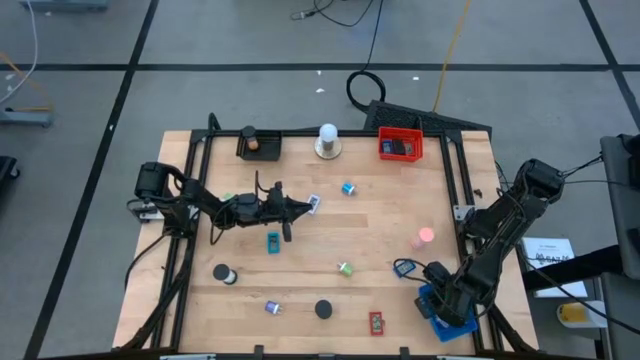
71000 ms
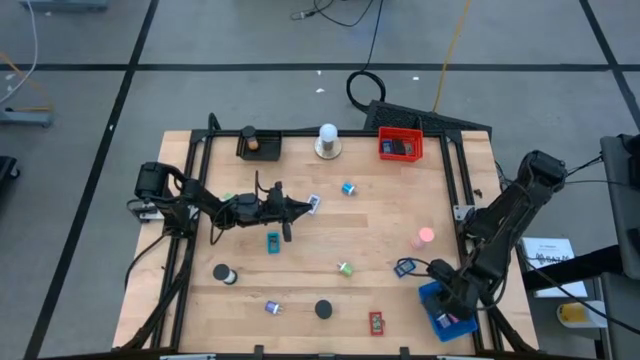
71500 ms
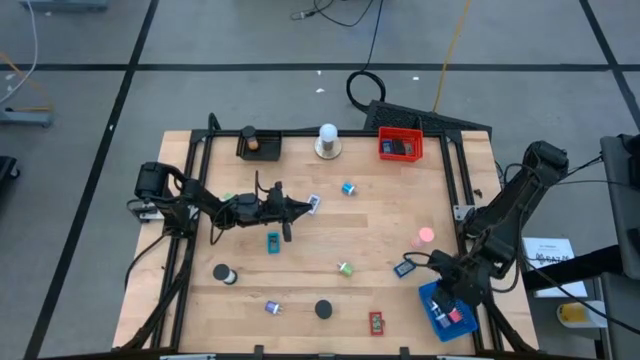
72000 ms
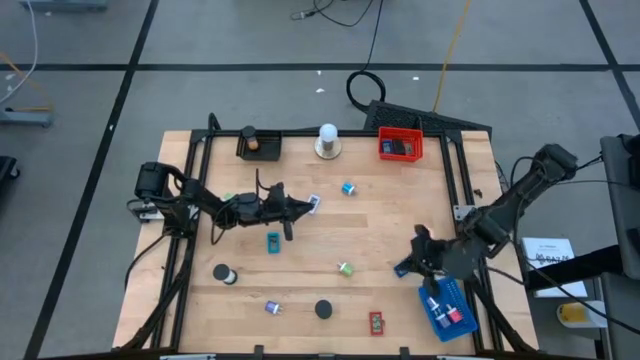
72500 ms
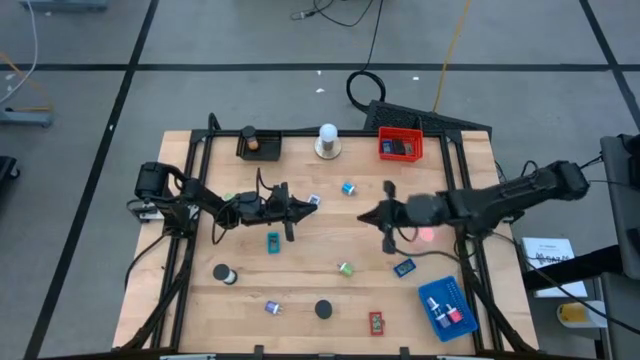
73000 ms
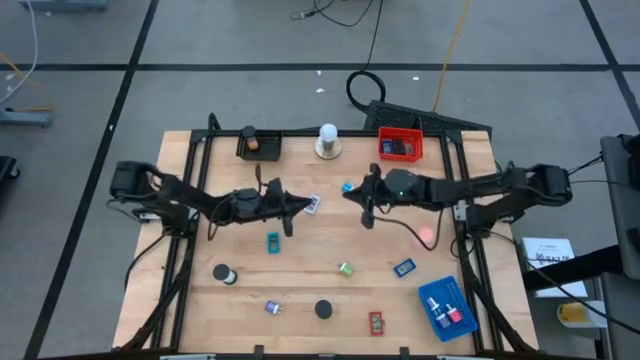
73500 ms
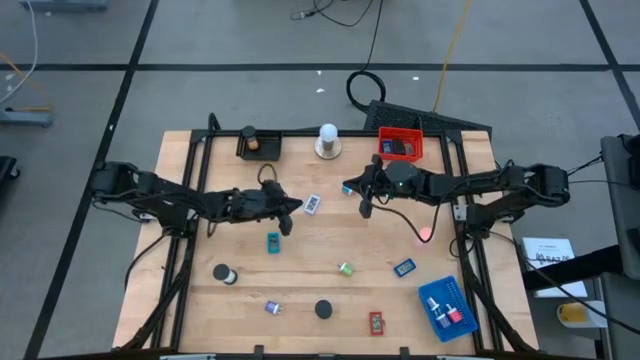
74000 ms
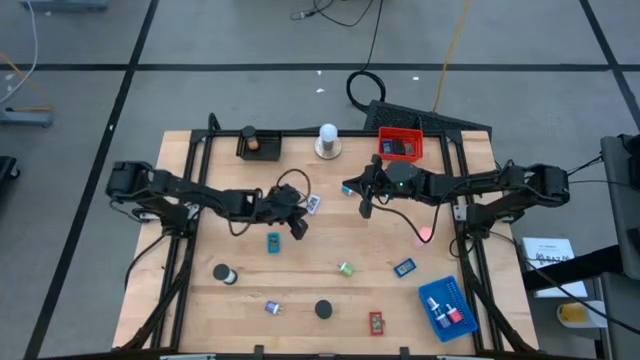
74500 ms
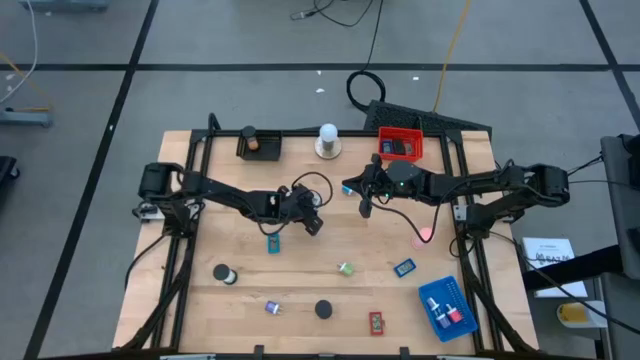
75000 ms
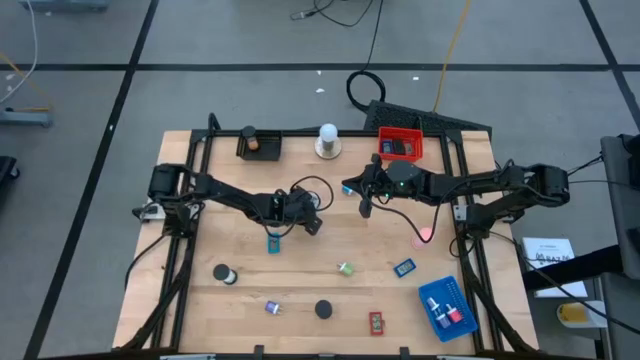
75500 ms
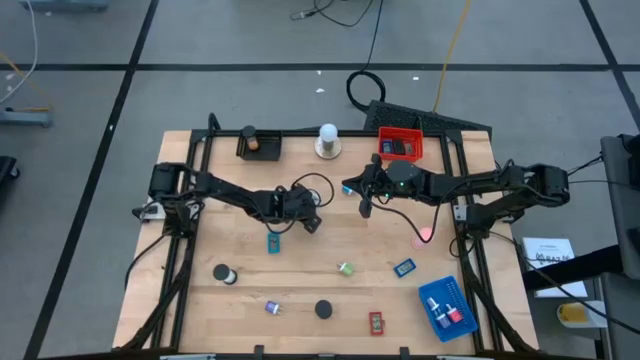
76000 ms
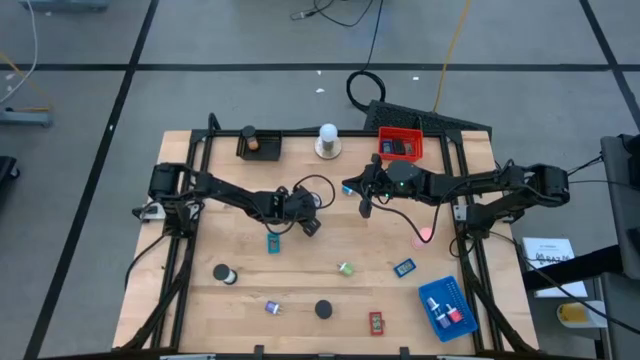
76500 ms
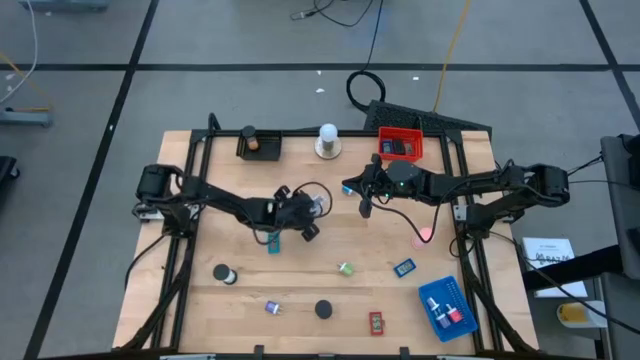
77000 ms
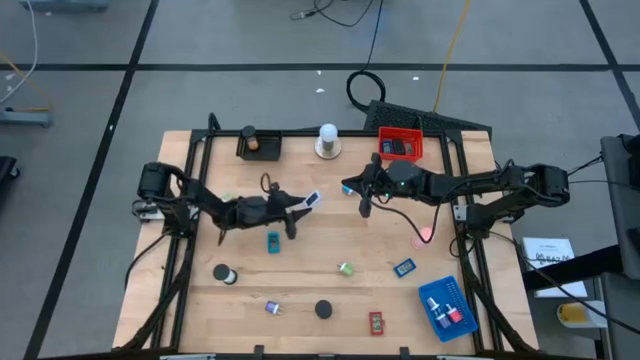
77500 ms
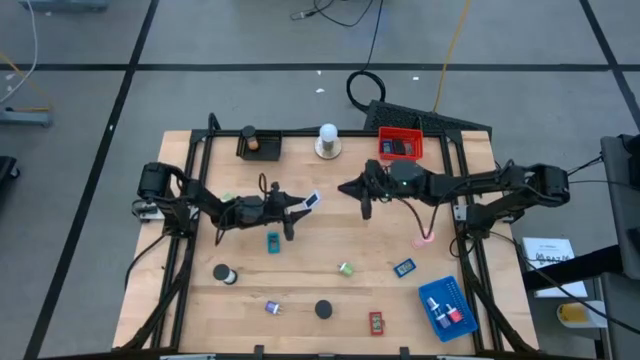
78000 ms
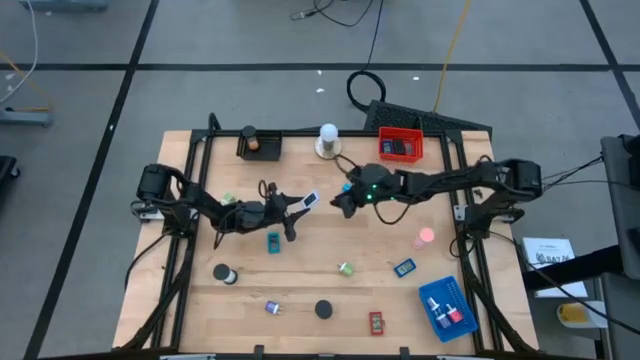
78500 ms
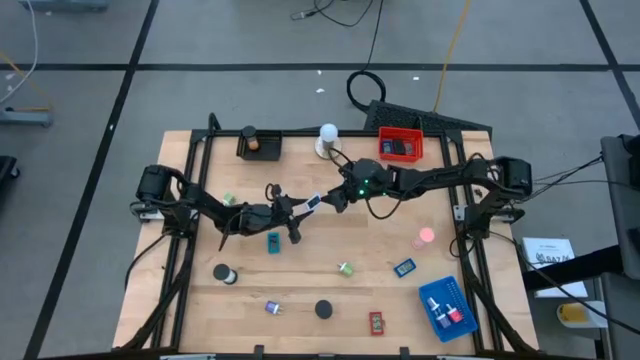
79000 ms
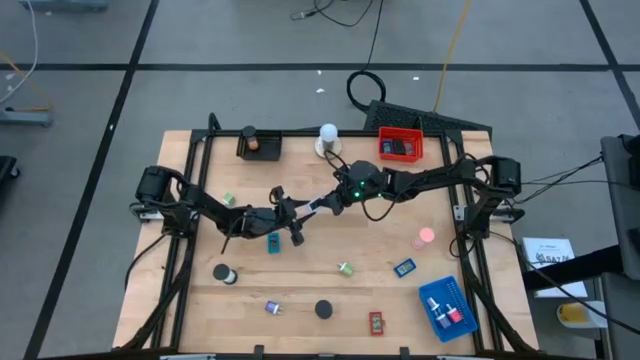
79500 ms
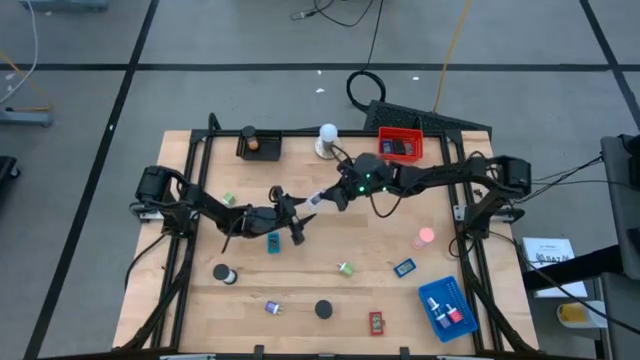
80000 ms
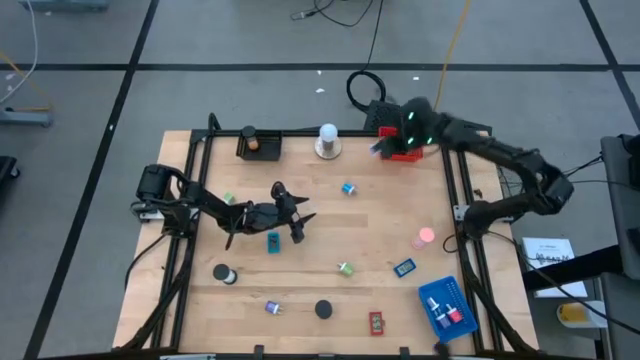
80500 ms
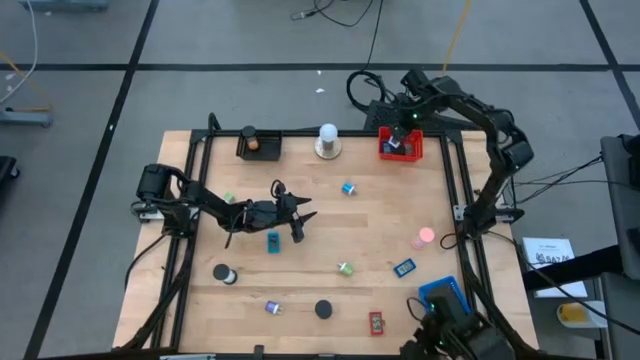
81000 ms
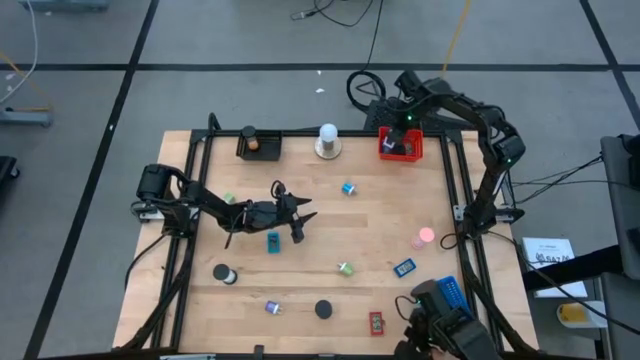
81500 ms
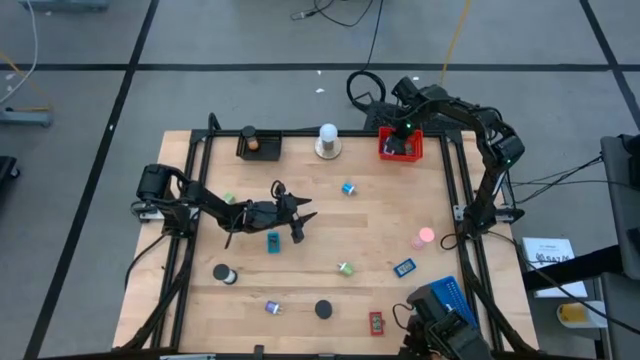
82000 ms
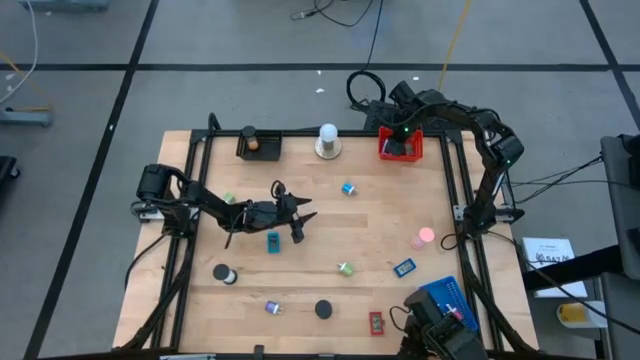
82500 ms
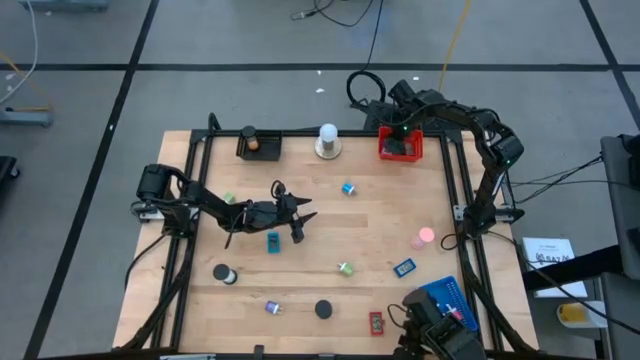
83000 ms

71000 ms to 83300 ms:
Task: Pick & Place Office items
Put the white digital timer into the red bin

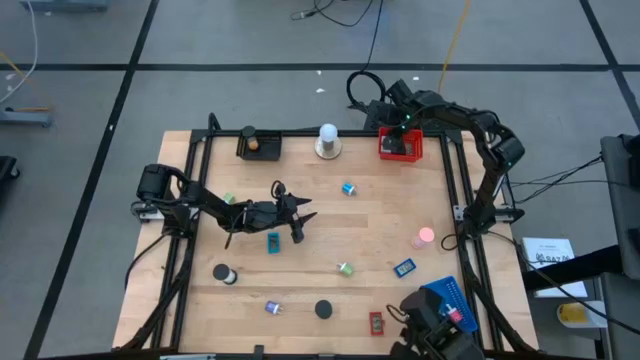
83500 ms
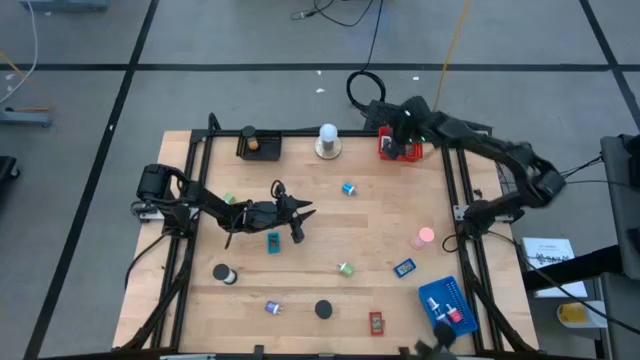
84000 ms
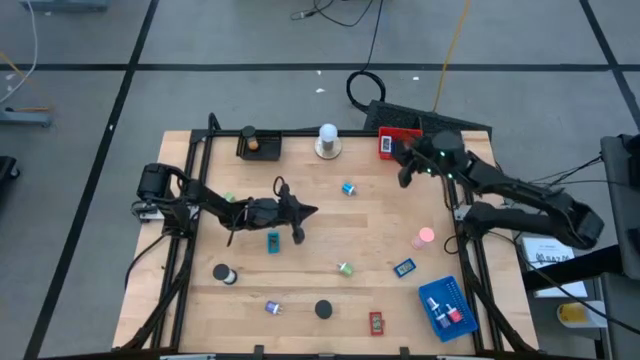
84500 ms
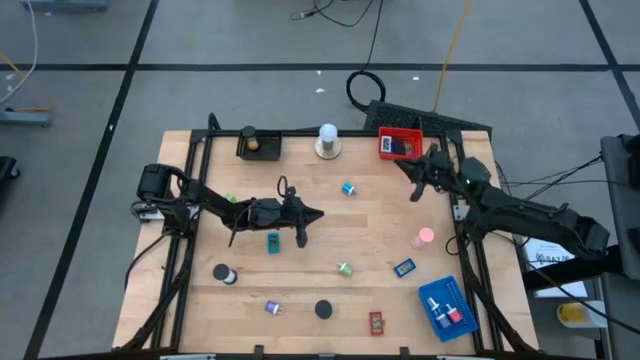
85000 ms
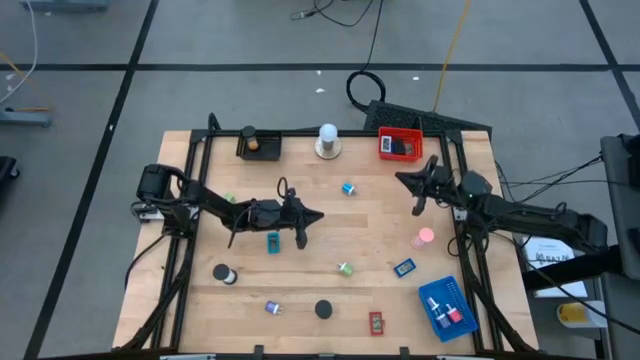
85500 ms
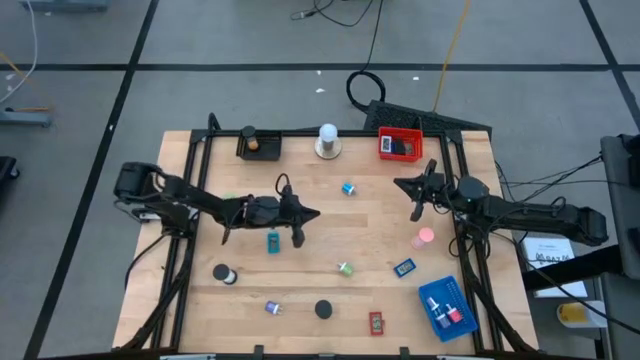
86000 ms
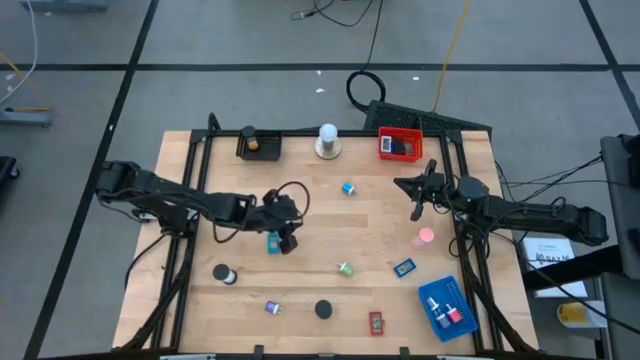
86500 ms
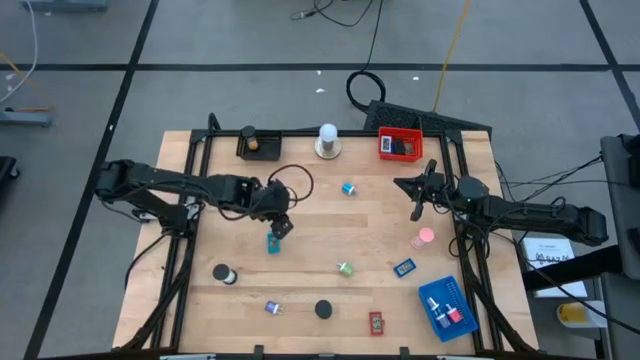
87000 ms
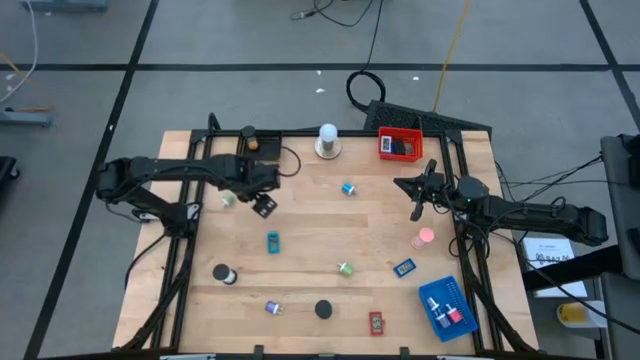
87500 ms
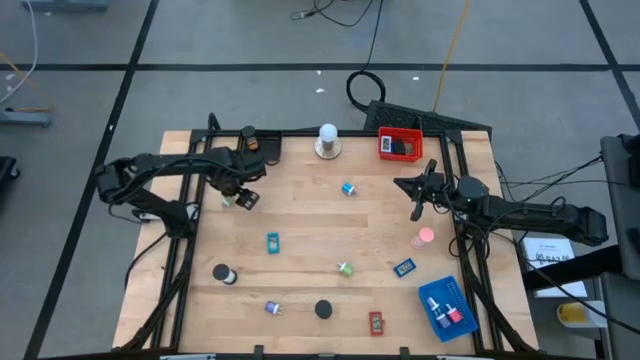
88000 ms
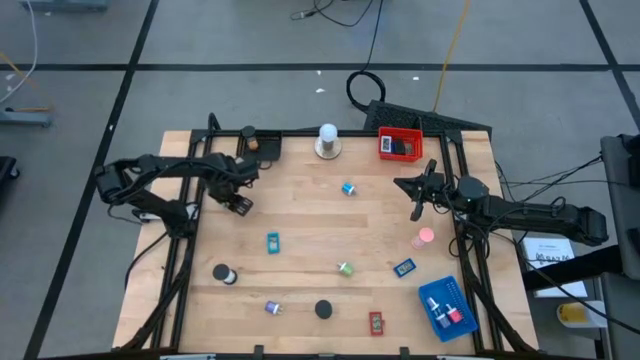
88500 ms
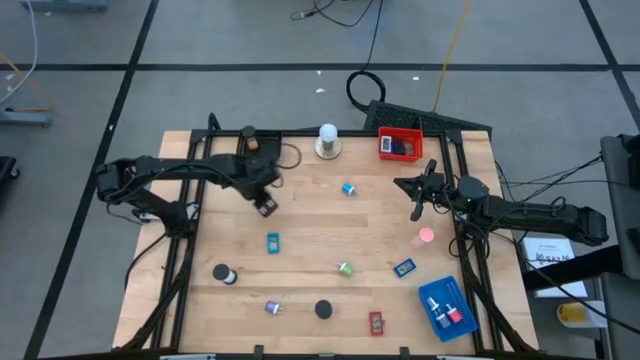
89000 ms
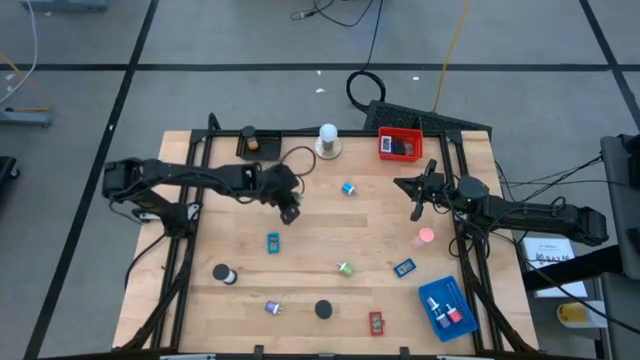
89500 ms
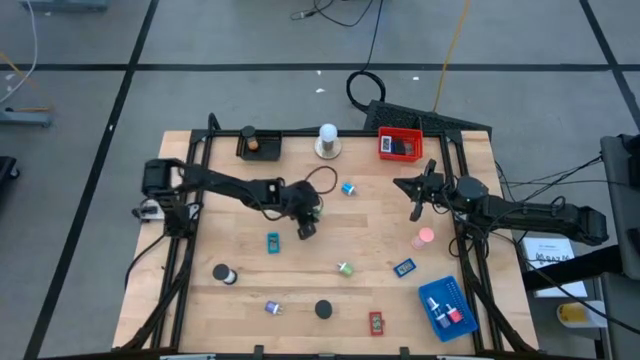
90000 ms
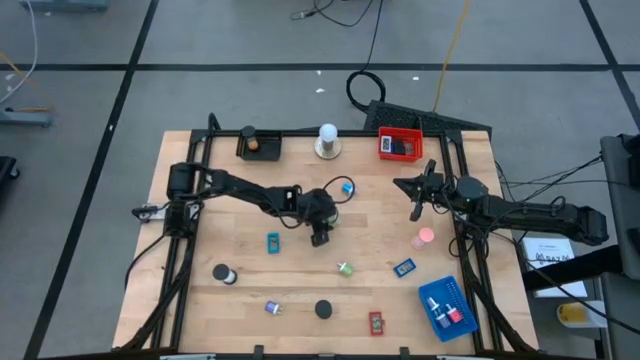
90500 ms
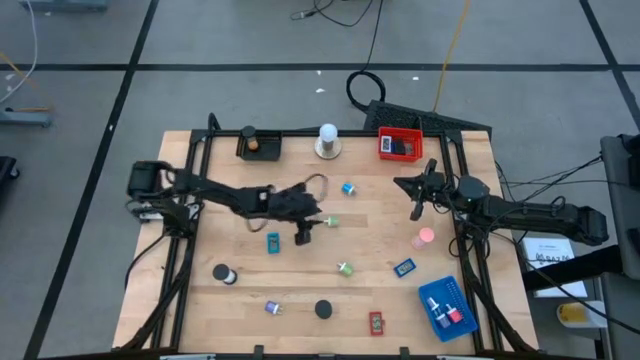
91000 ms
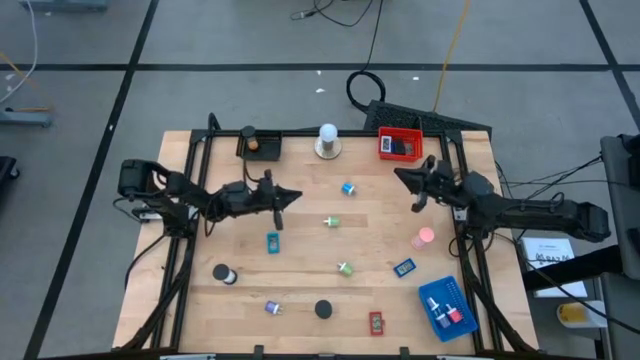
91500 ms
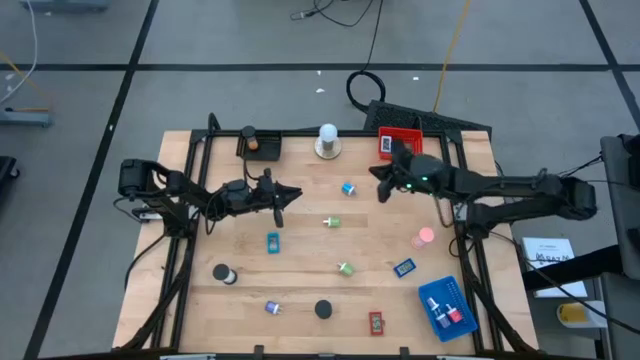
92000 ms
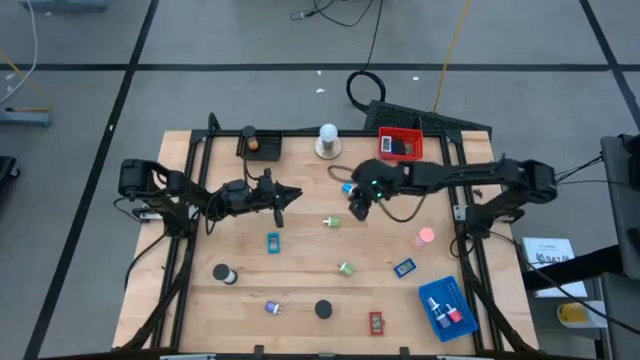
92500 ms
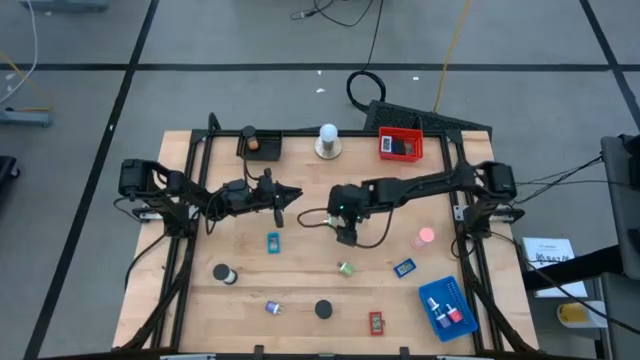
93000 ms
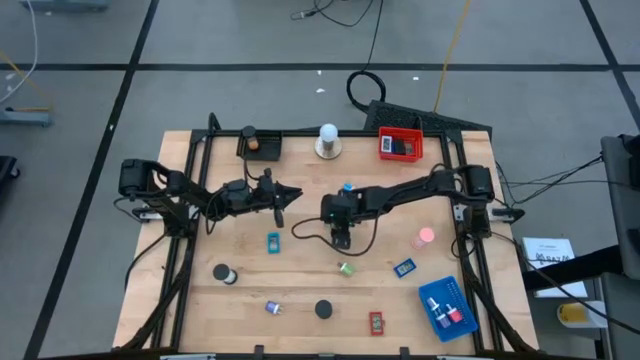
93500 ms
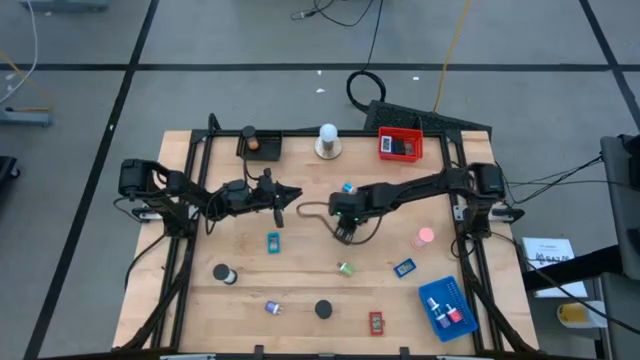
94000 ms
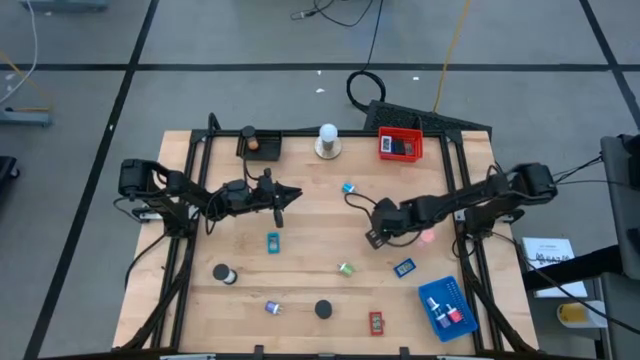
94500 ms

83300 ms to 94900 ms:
Put the green charger adapter into the blue bin
